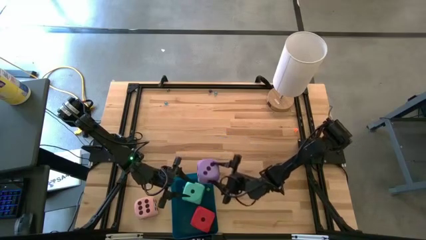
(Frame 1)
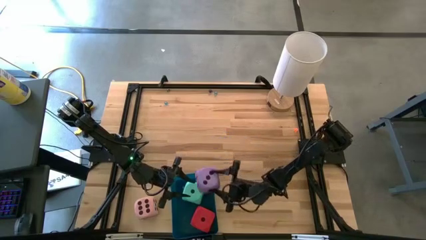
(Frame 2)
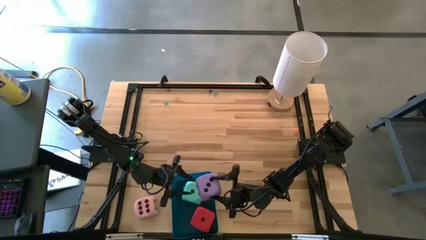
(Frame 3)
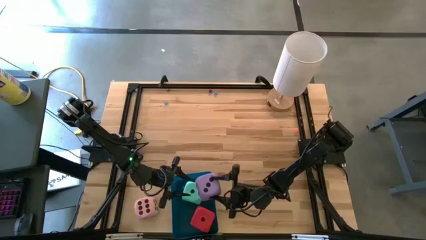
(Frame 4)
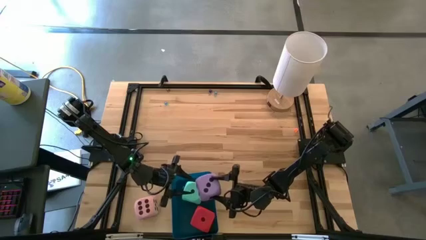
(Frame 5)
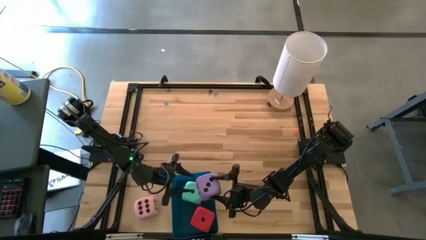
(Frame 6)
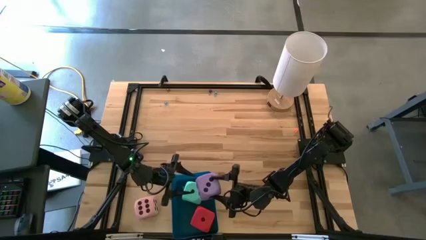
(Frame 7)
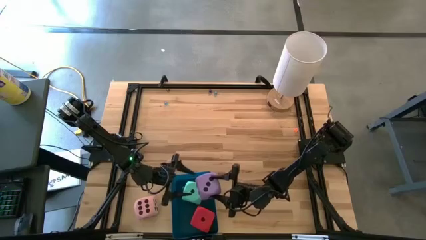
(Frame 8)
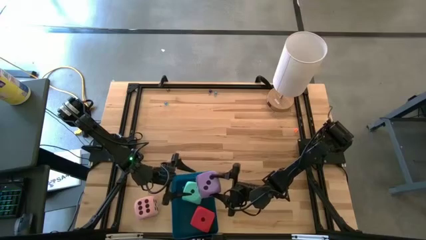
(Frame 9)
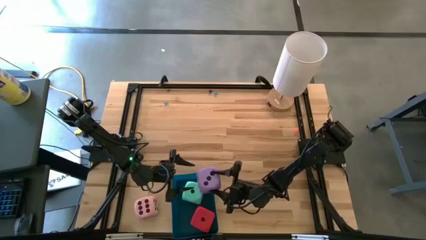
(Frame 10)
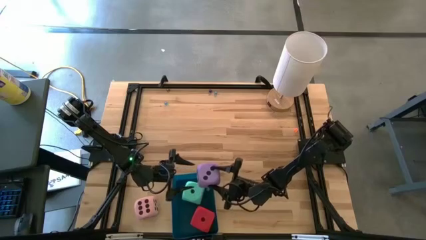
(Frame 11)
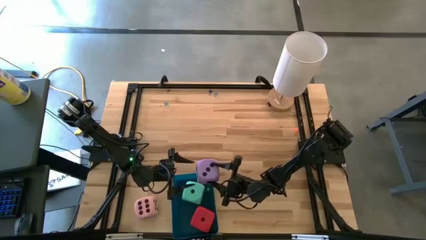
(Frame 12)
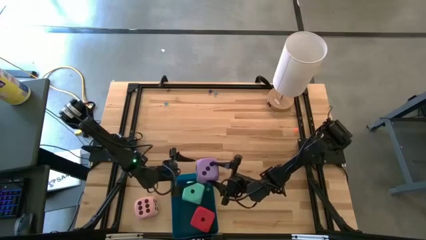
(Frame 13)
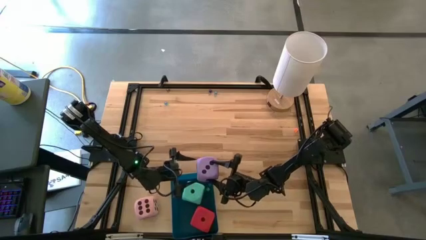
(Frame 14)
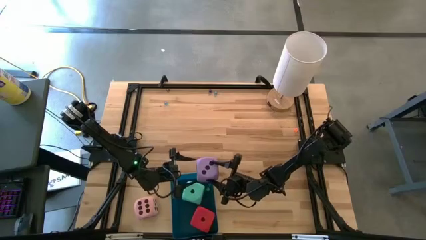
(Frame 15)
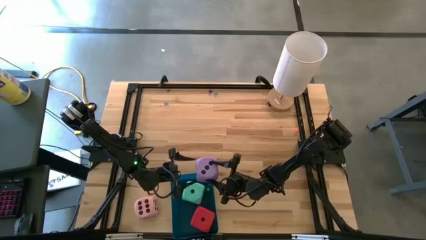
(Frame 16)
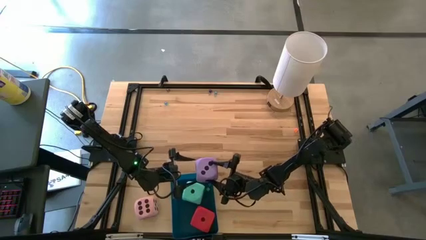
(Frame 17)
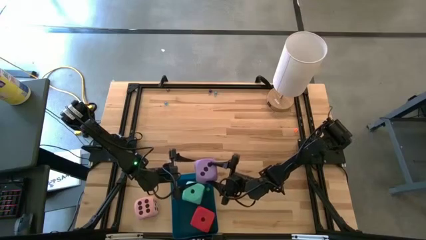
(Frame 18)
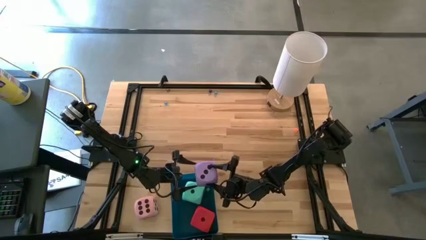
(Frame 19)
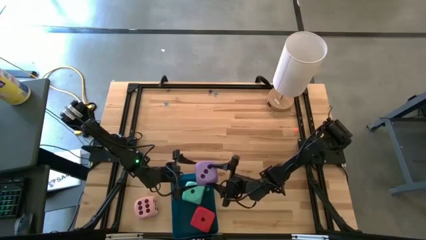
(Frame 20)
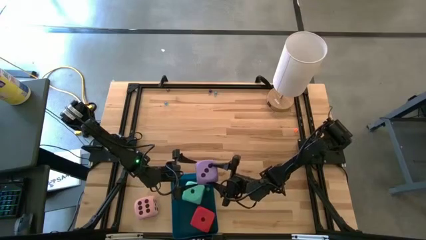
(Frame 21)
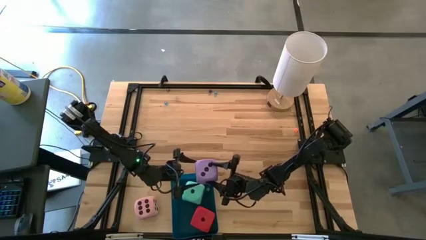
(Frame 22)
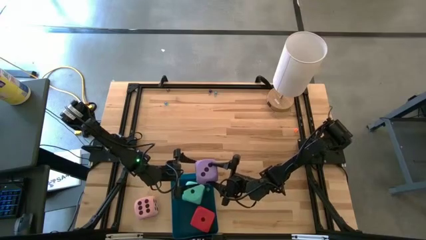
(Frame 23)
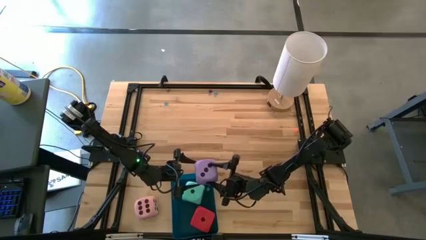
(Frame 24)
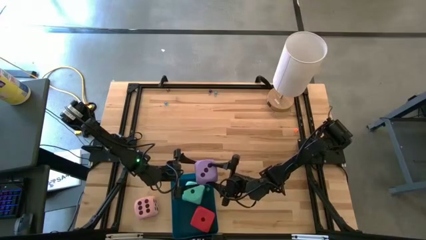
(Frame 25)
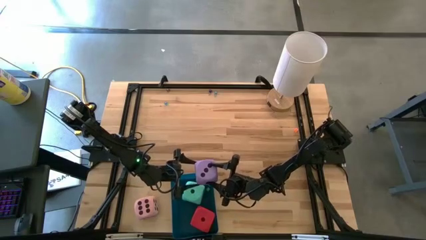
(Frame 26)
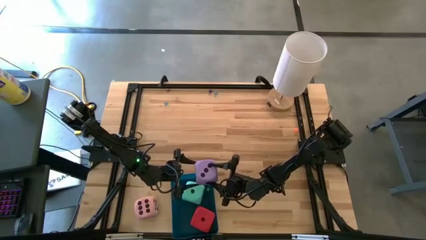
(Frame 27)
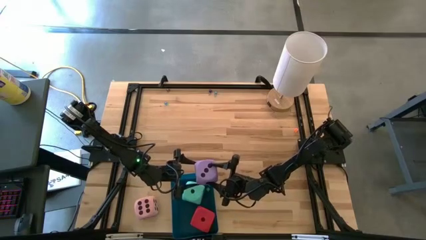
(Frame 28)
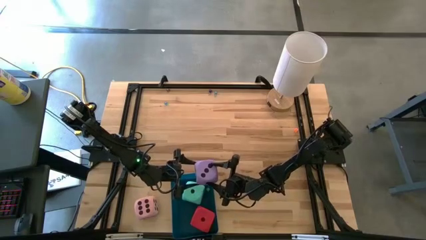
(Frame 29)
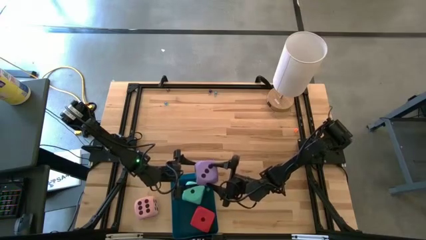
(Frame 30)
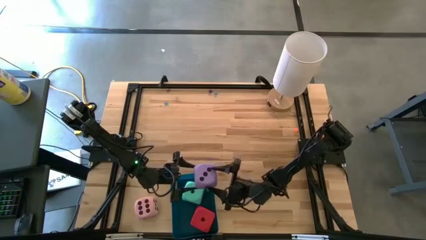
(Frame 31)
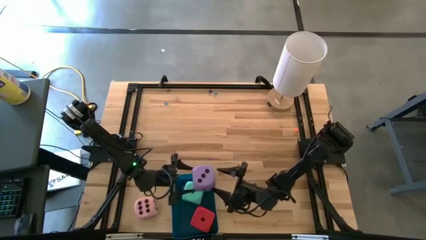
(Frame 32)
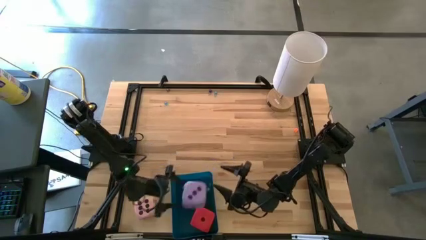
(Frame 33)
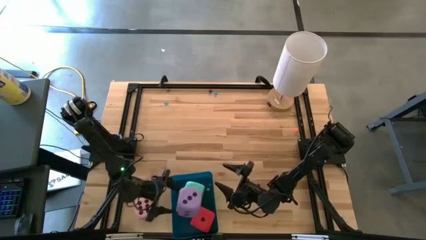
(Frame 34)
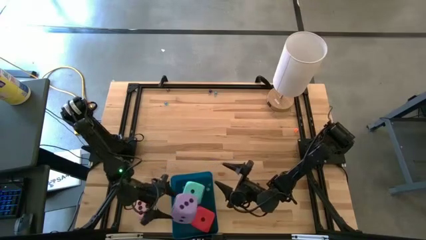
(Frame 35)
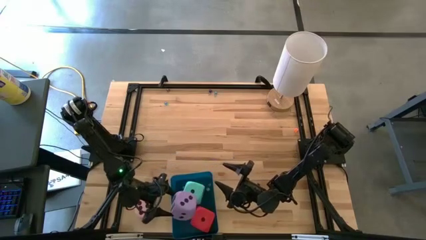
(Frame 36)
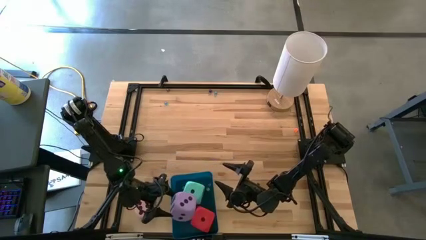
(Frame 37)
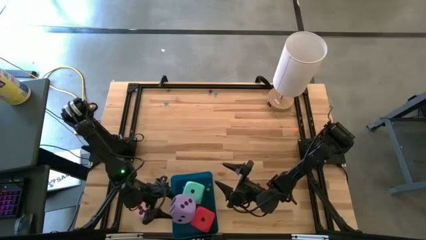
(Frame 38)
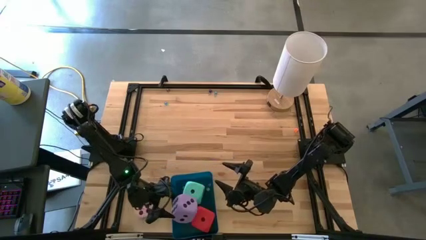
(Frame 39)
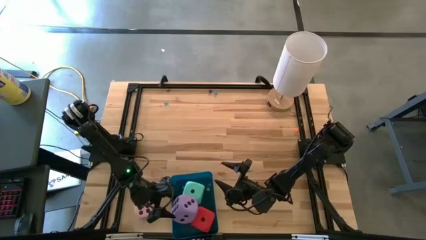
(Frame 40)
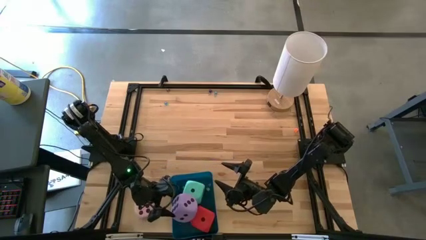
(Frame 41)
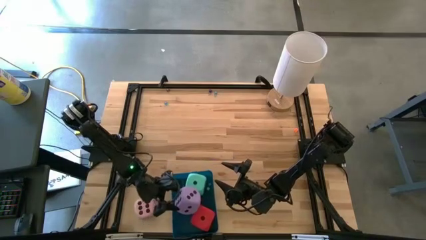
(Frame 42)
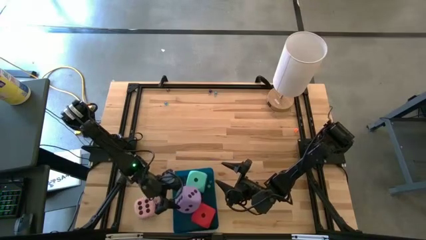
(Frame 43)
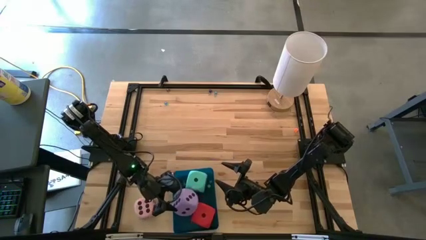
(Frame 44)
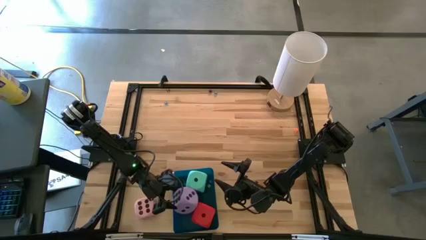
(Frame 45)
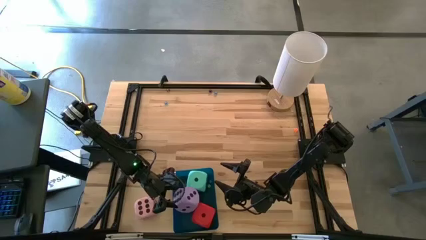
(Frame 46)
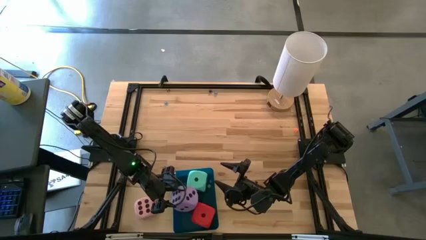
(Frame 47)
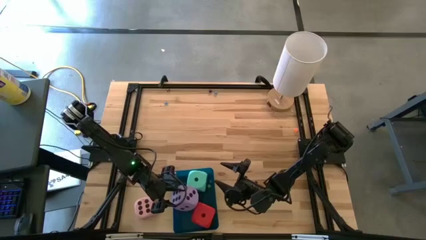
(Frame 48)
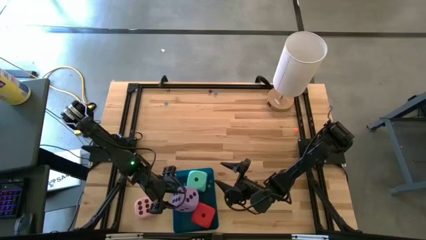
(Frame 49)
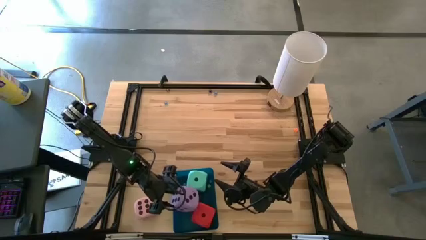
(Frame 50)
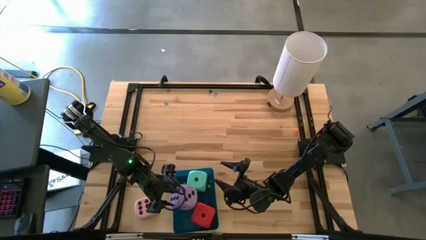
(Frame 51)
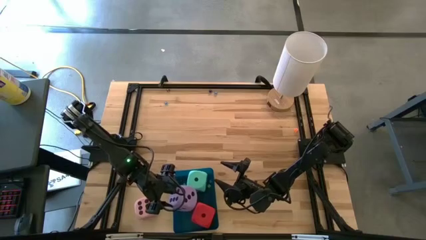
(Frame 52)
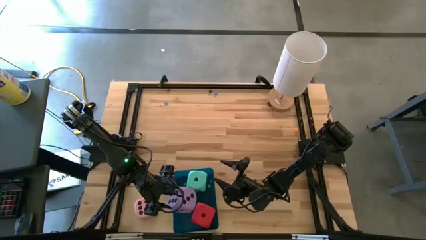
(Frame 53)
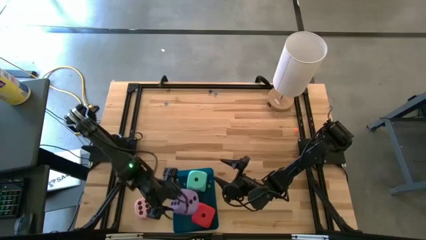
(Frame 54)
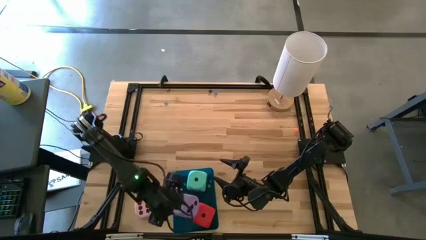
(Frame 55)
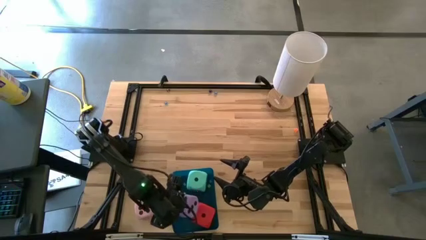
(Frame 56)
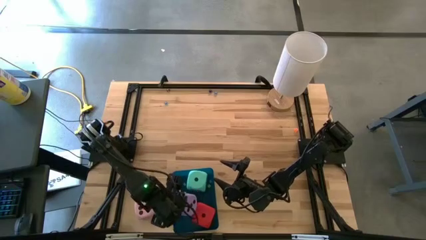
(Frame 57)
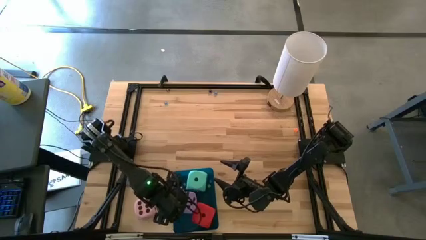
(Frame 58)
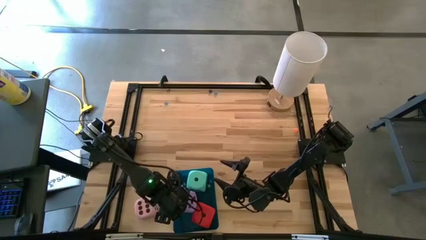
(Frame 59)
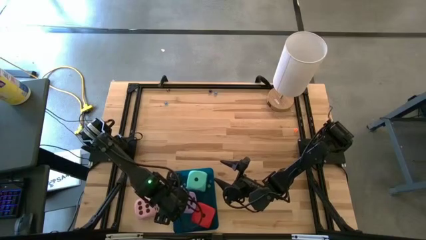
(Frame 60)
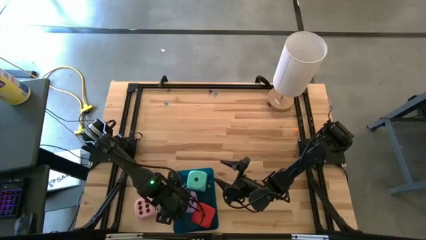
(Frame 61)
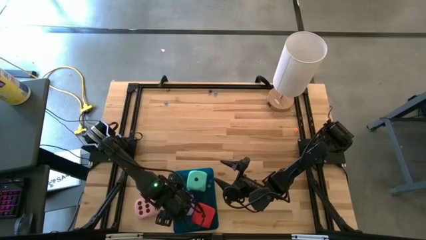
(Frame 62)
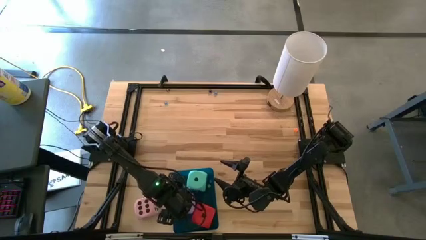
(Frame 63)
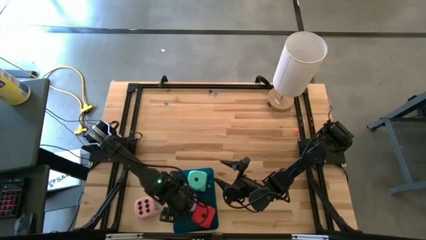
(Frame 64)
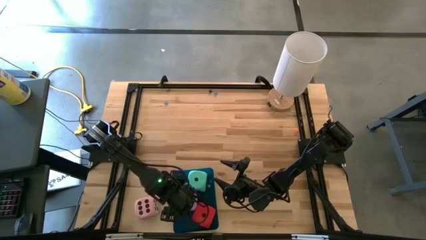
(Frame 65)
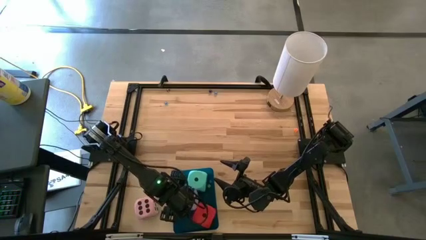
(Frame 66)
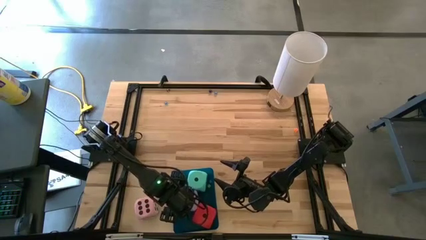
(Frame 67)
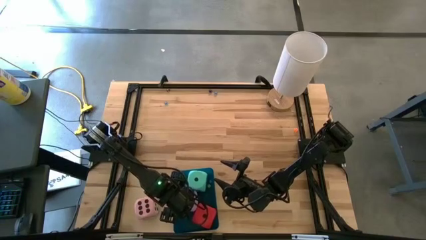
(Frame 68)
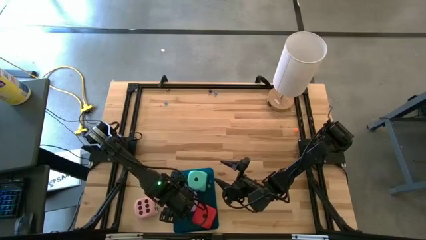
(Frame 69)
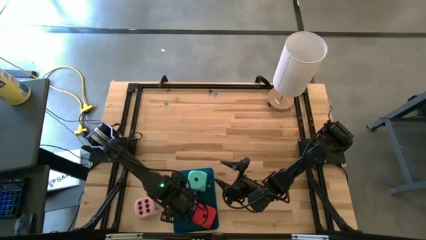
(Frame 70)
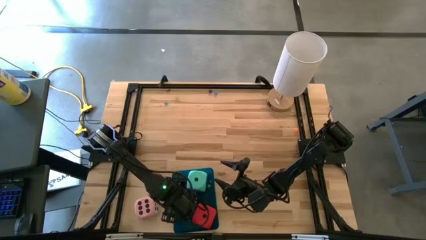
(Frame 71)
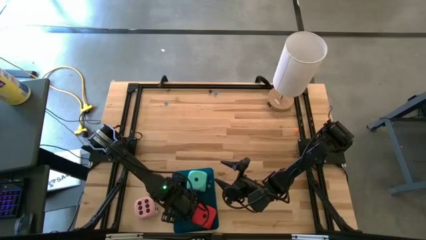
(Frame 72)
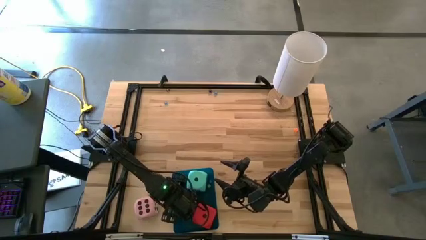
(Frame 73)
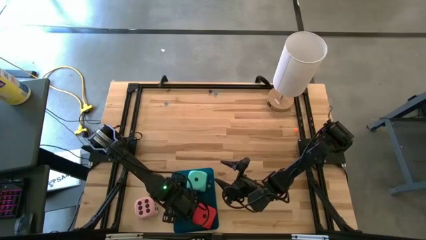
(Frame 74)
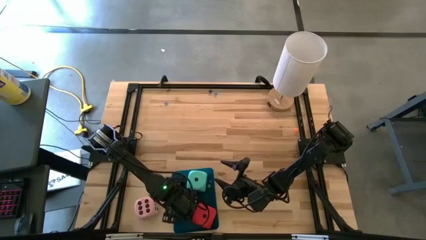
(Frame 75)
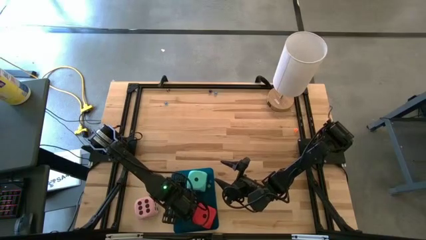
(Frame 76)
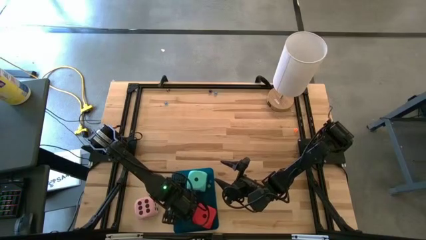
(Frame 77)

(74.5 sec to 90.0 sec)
Task: Pick & Place Dice
Put the big violet die into the blue bin
